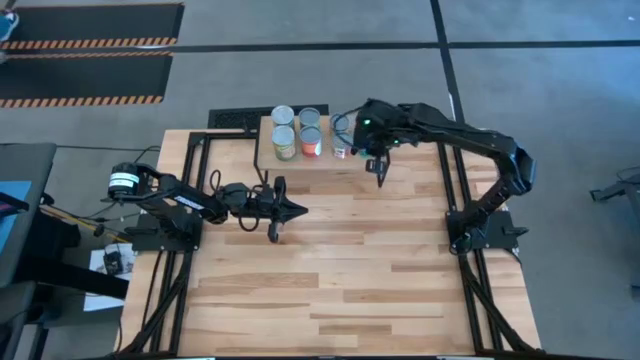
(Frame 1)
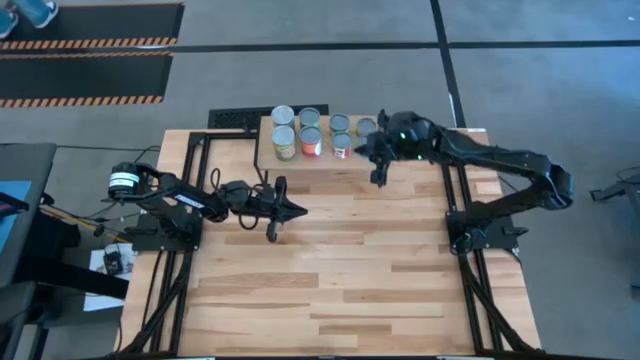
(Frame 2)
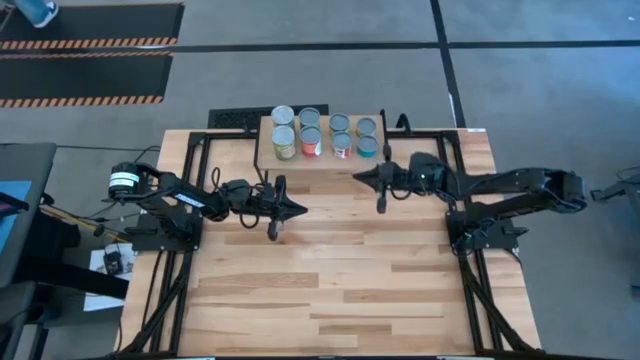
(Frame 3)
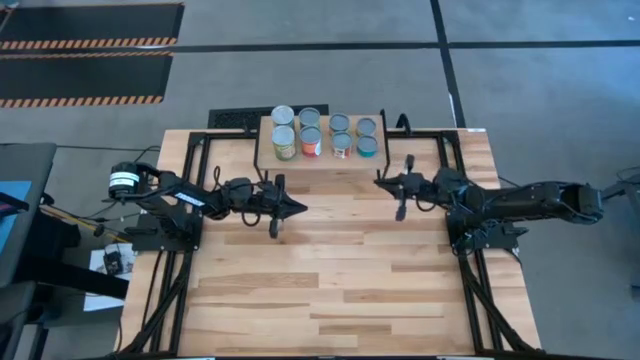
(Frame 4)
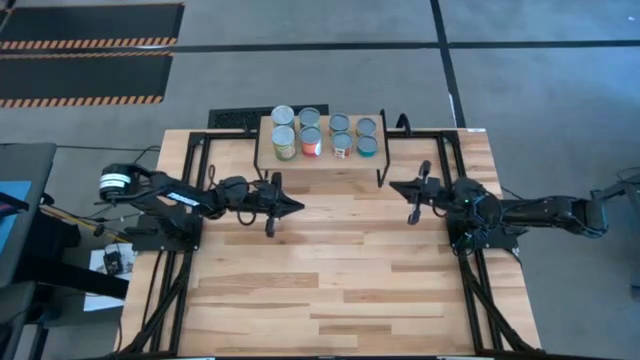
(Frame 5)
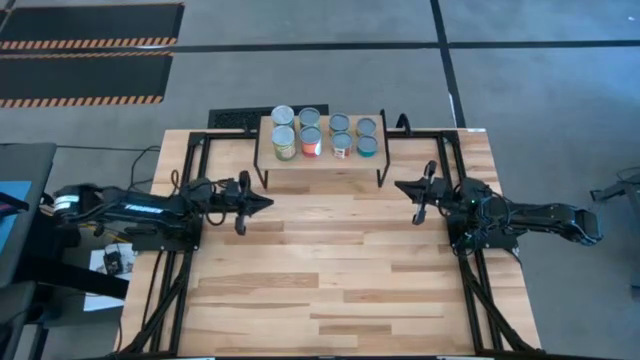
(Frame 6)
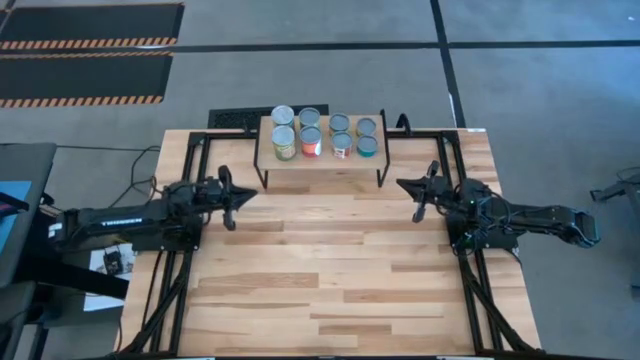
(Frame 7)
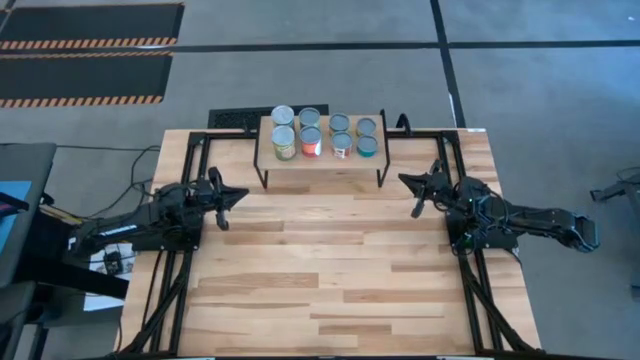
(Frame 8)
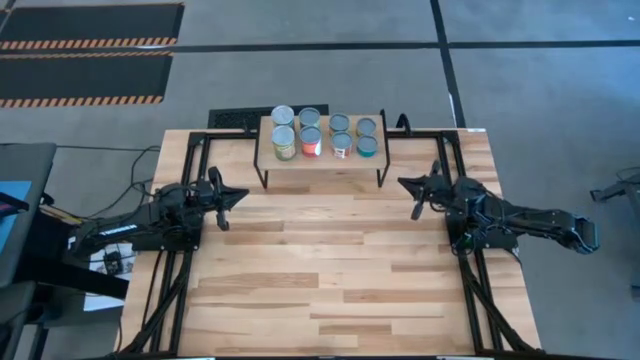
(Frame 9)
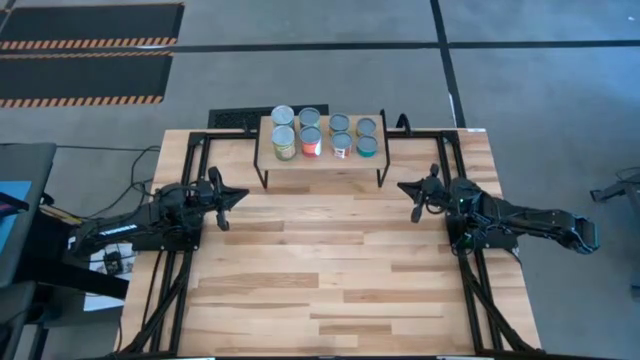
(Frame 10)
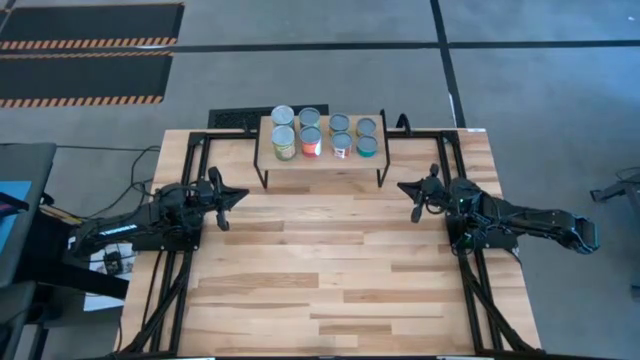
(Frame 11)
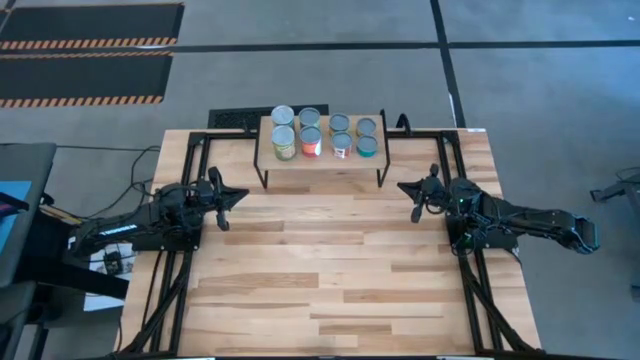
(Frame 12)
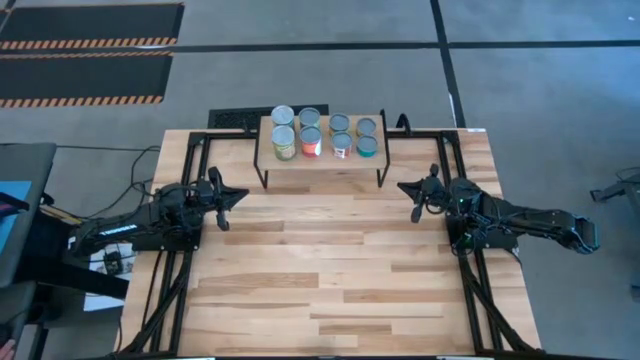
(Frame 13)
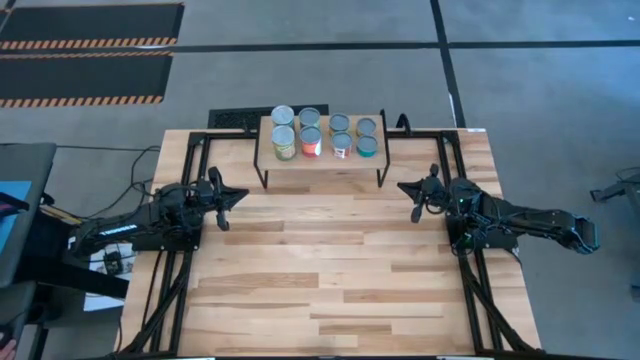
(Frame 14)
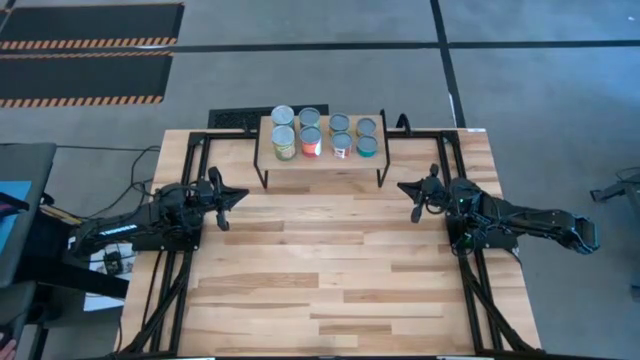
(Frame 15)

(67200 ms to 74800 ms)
Task: Pick and place cans onto a shelf
Return to Home Position

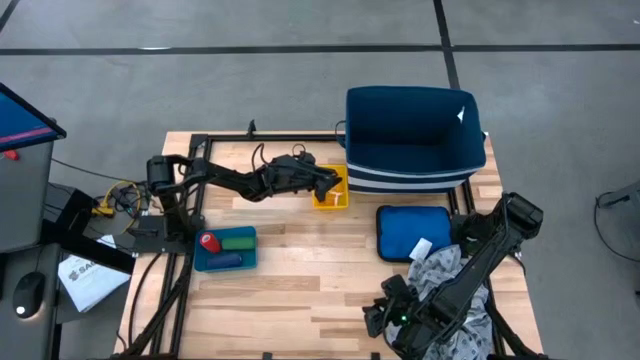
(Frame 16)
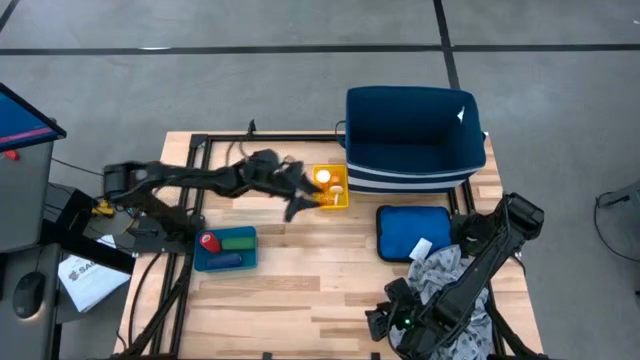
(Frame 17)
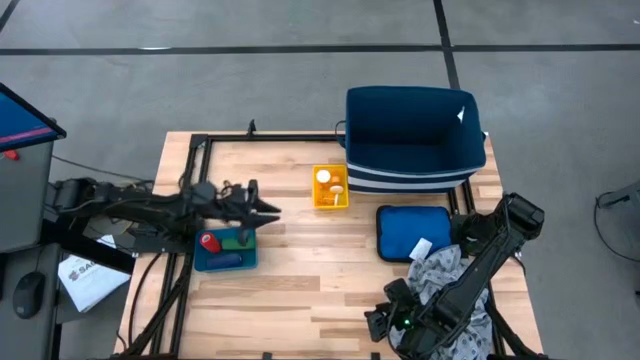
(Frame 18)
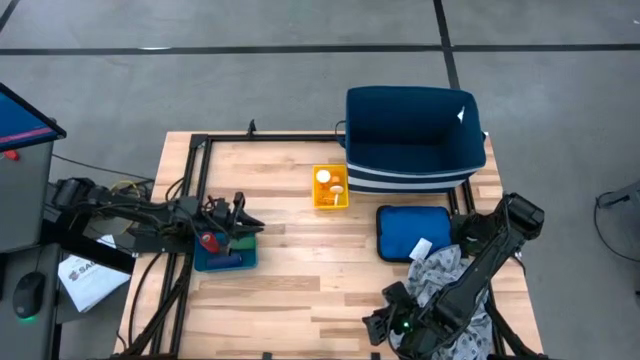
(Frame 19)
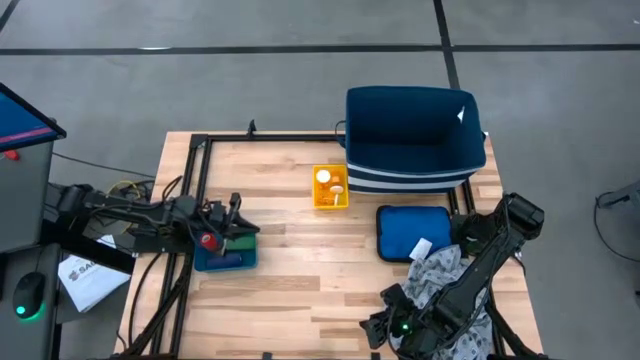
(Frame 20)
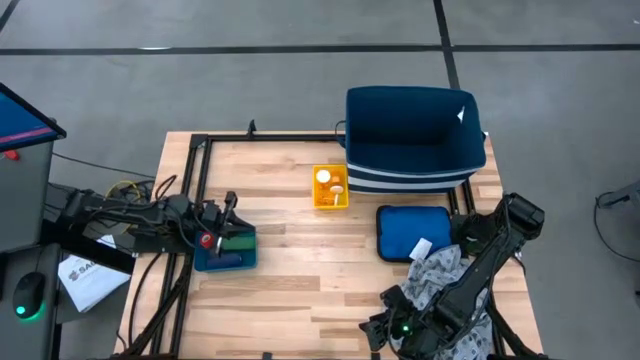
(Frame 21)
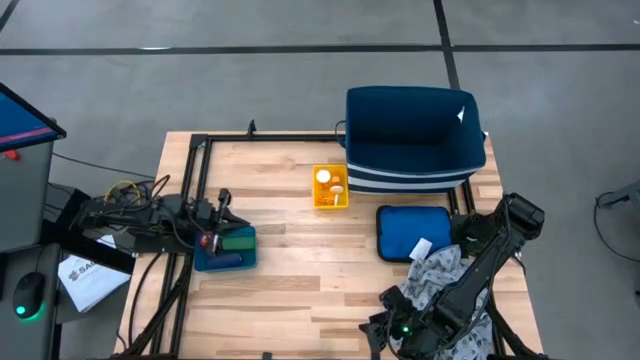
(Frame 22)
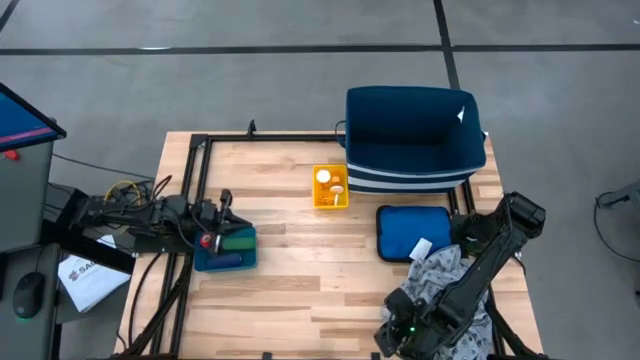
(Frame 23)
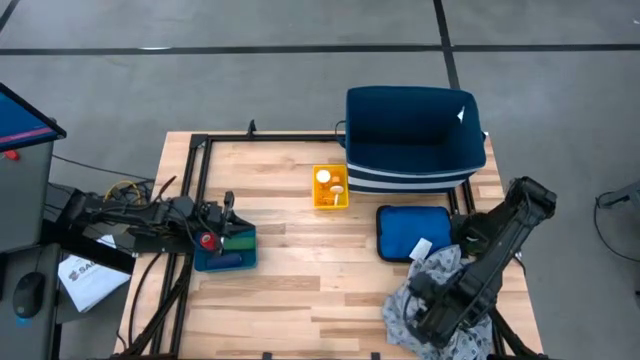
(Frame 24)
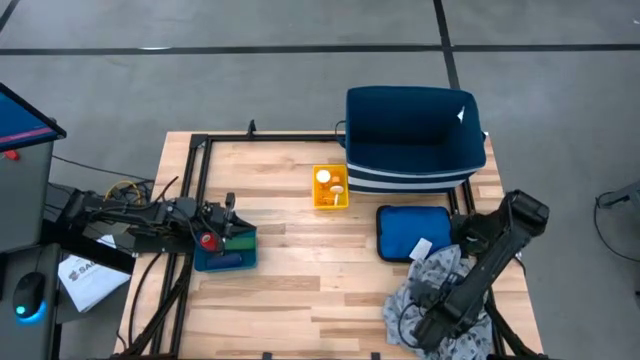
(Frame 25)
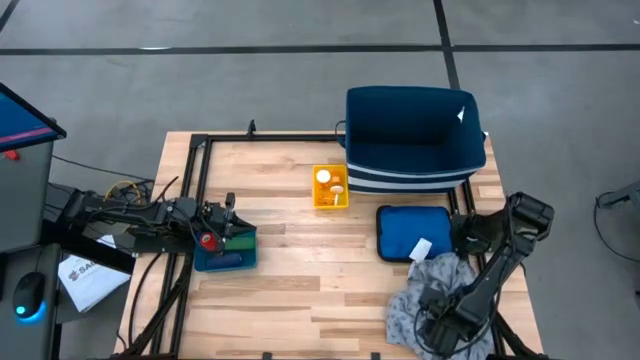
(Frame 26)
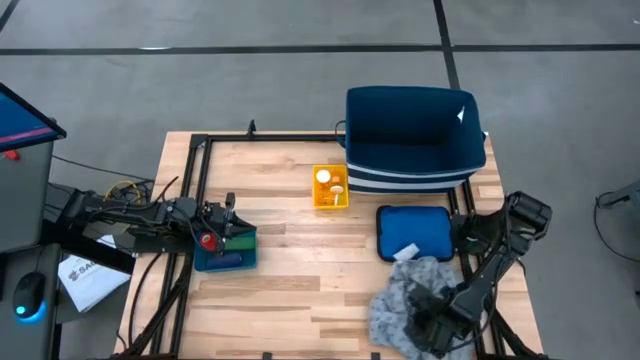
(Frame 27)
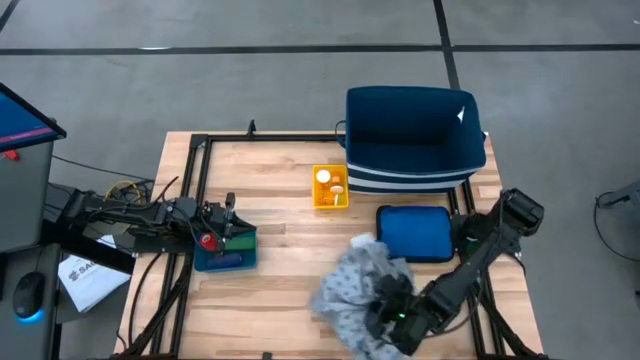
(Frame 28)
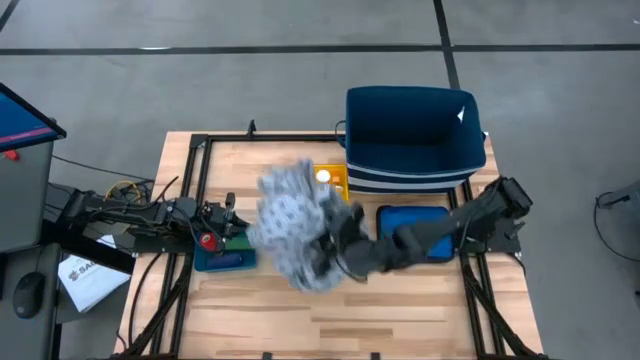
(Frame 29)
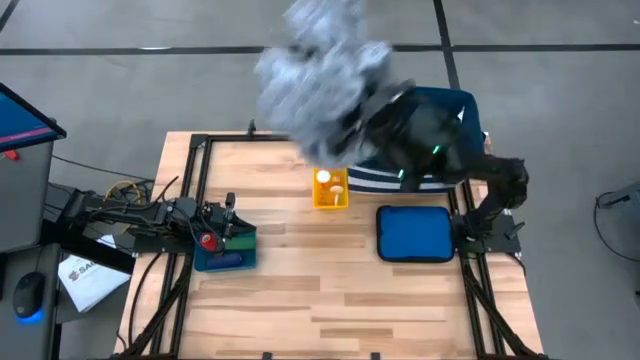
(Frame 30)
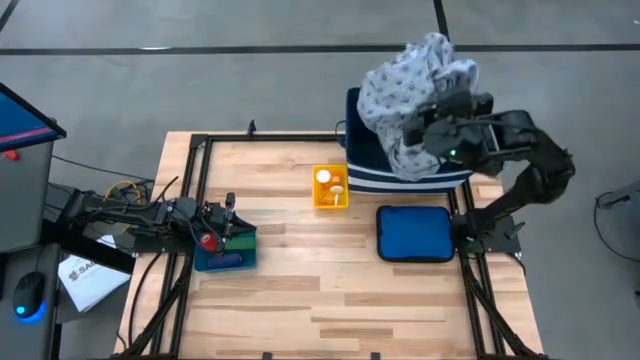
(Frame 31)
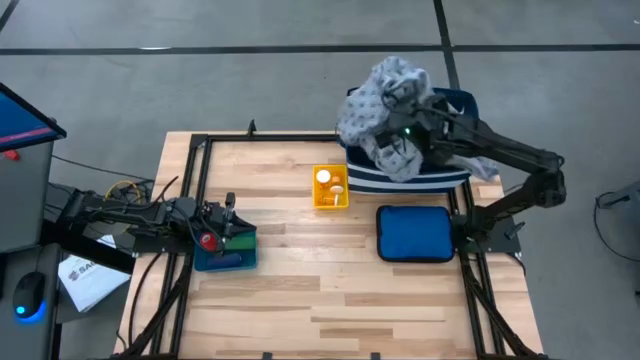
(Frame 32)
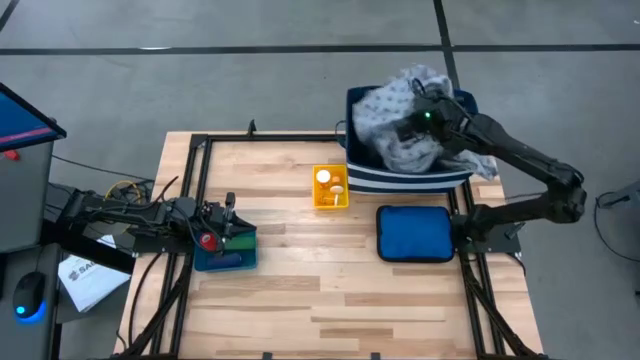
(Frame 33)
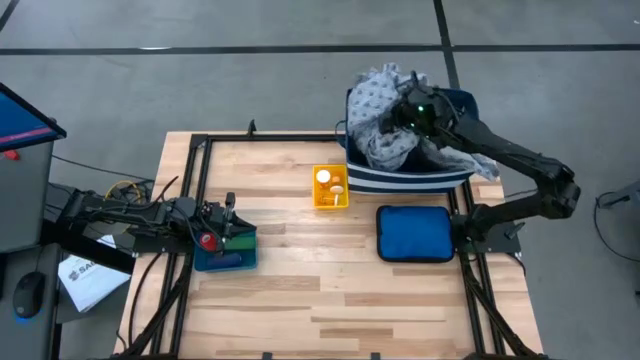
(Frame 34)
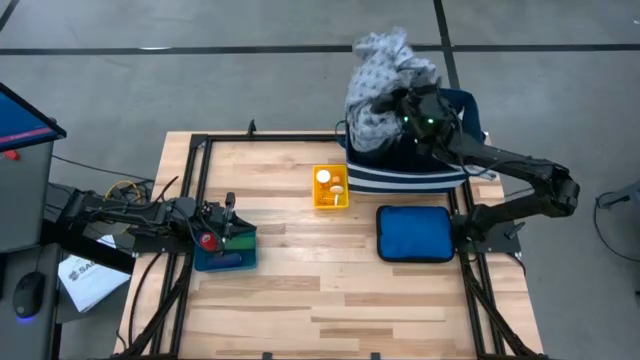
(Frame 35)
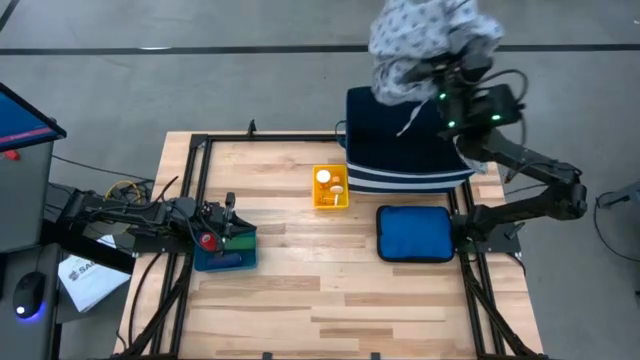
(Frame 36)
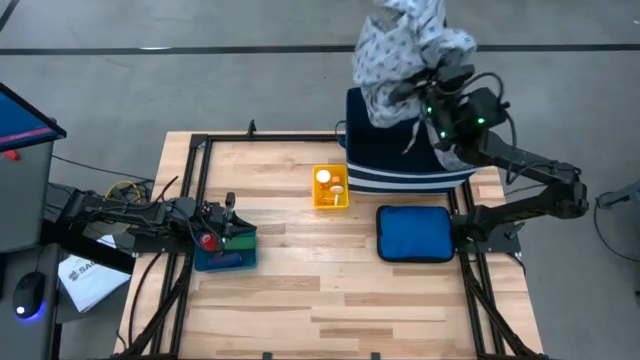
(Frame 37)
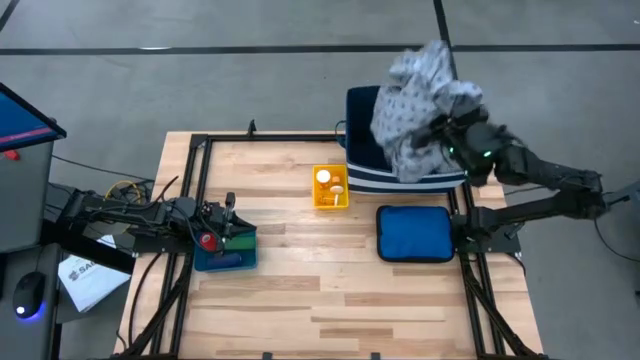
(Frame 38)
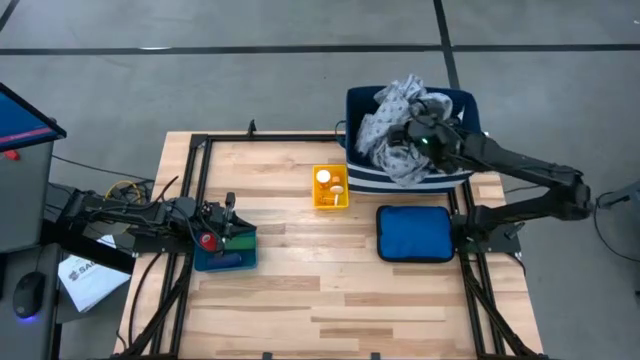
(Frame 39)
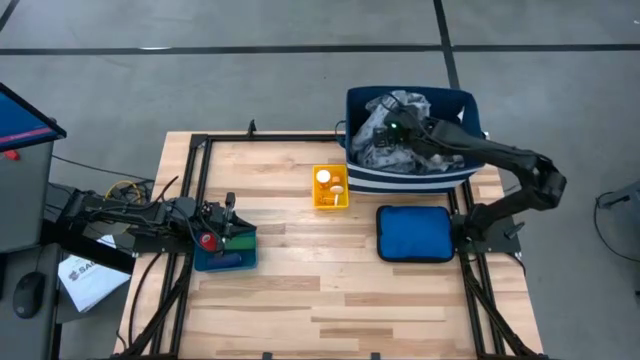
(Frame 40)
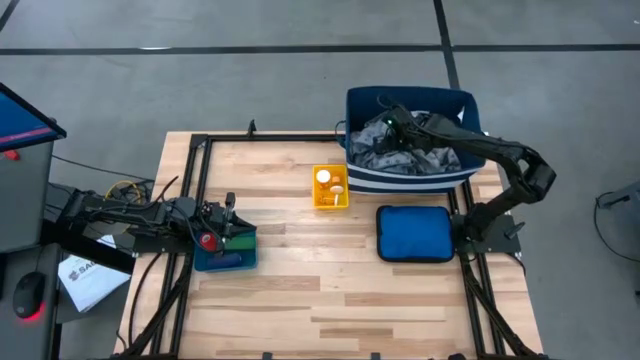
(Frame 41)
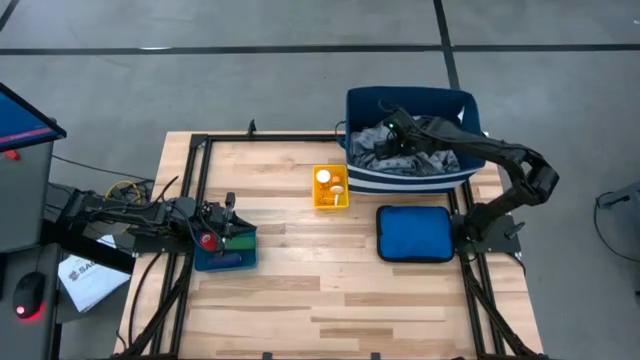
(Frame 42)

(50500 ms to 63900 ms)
Task: Pick & place medical supplies in basket/bin
Put the blue patient gown into the blue and white bin
